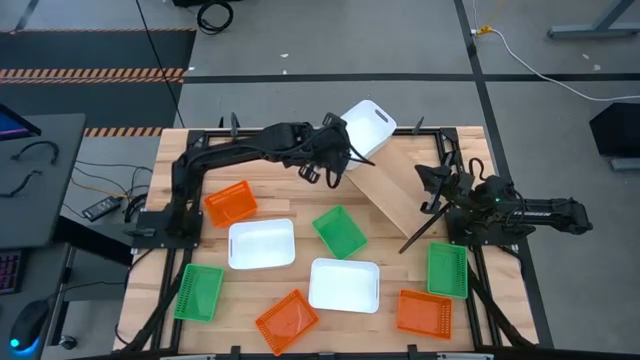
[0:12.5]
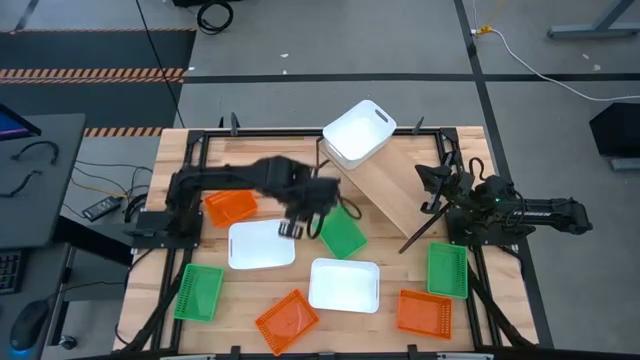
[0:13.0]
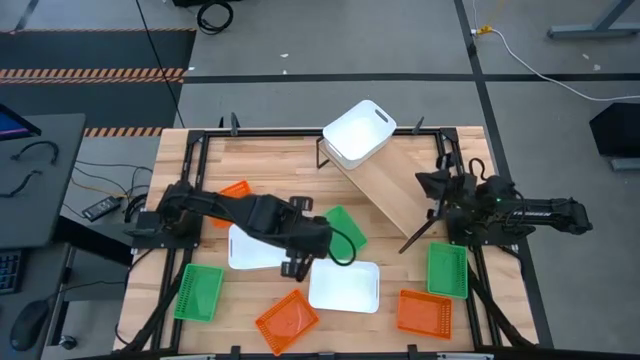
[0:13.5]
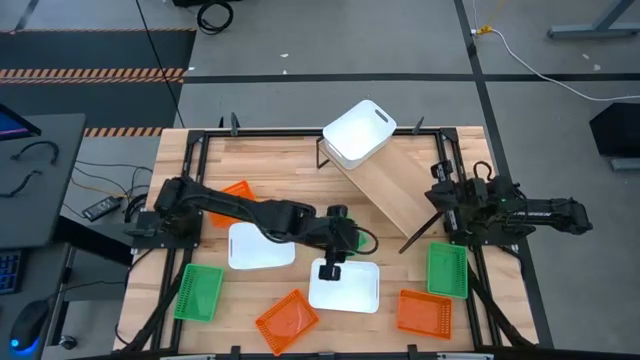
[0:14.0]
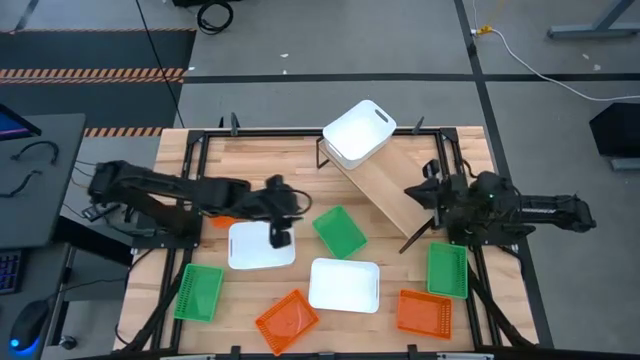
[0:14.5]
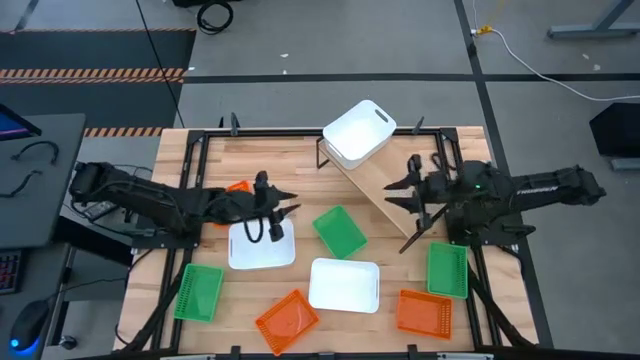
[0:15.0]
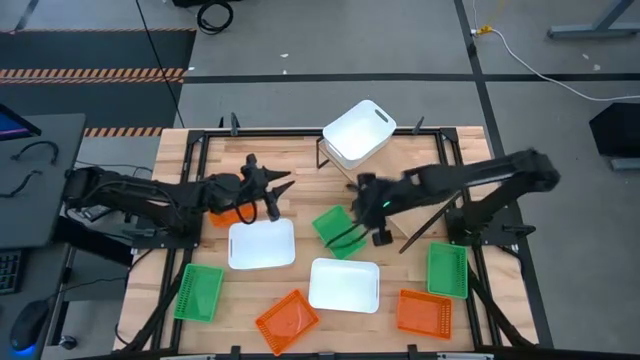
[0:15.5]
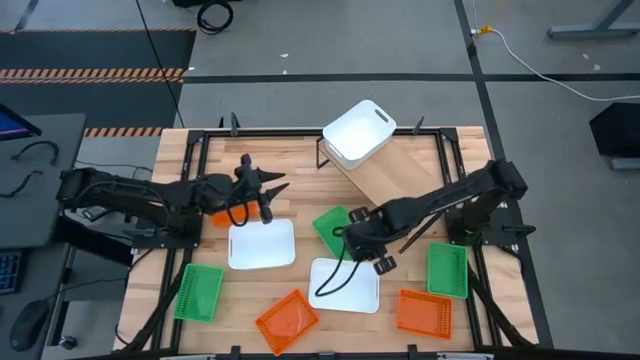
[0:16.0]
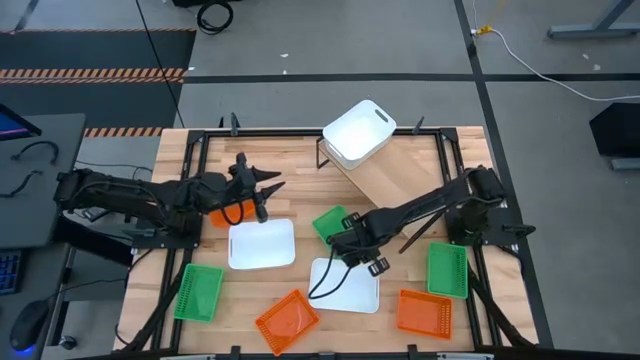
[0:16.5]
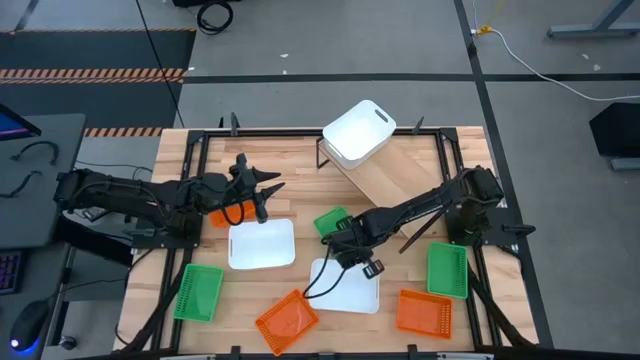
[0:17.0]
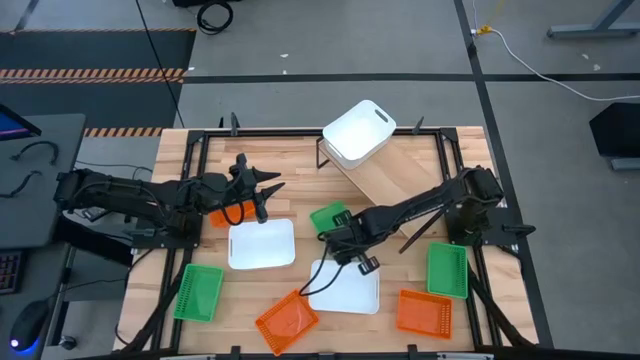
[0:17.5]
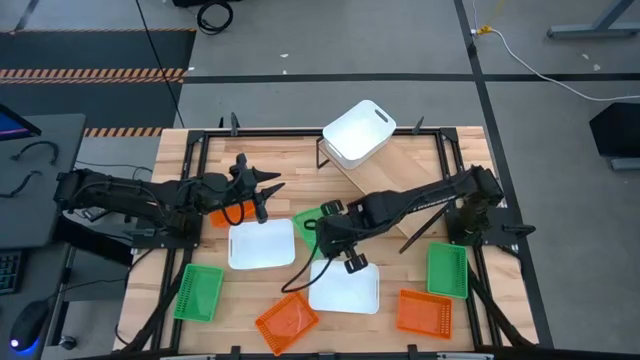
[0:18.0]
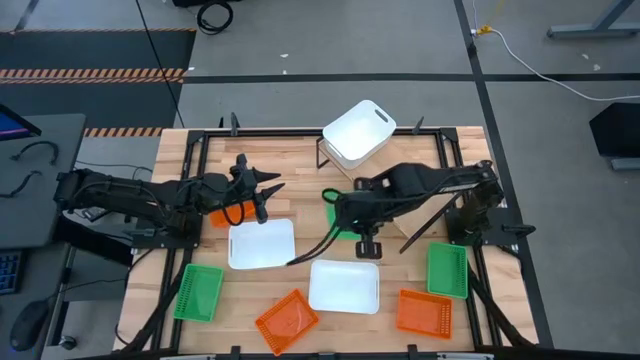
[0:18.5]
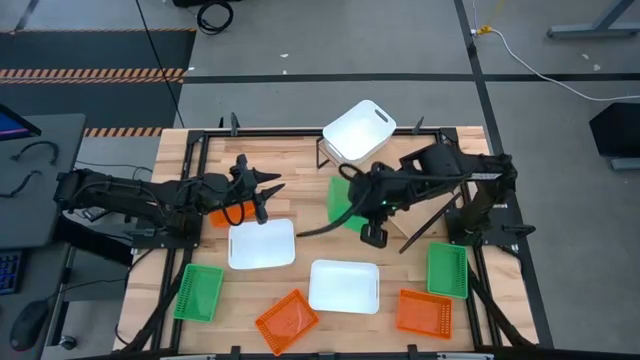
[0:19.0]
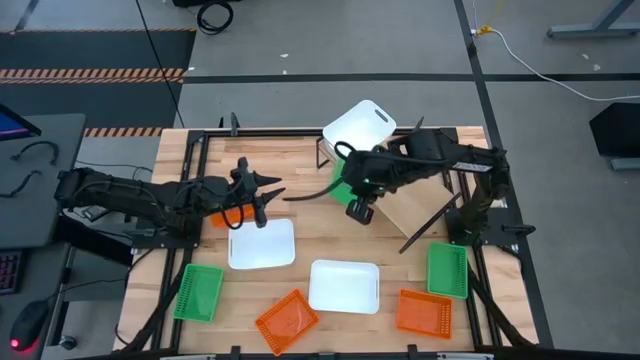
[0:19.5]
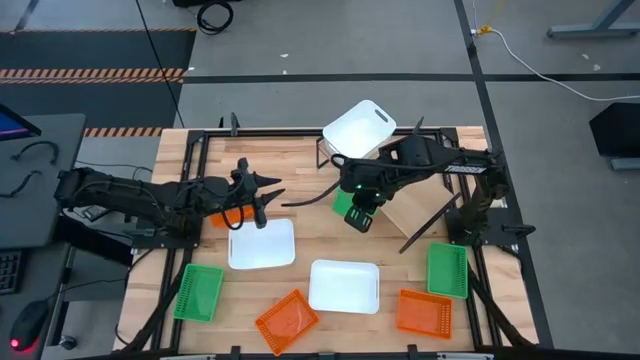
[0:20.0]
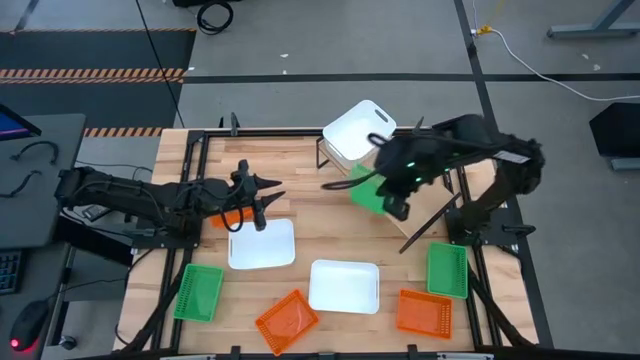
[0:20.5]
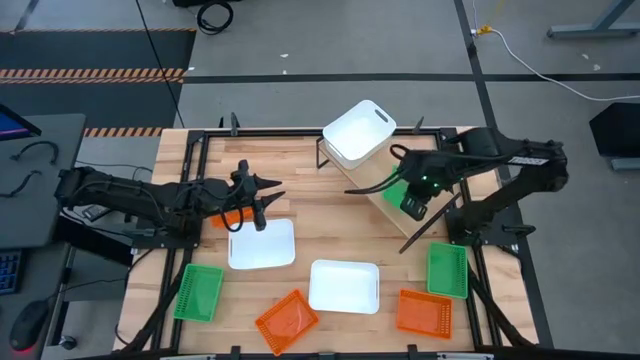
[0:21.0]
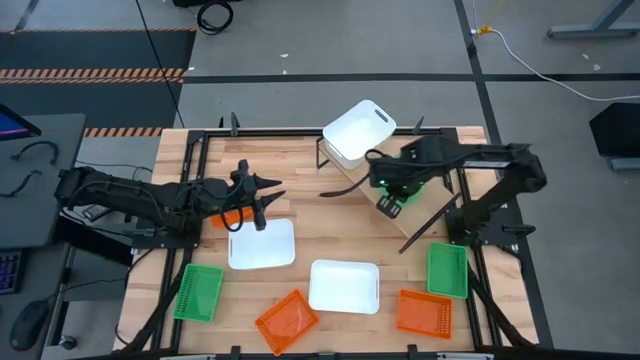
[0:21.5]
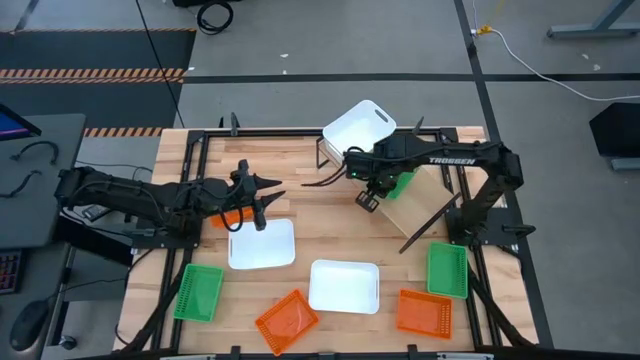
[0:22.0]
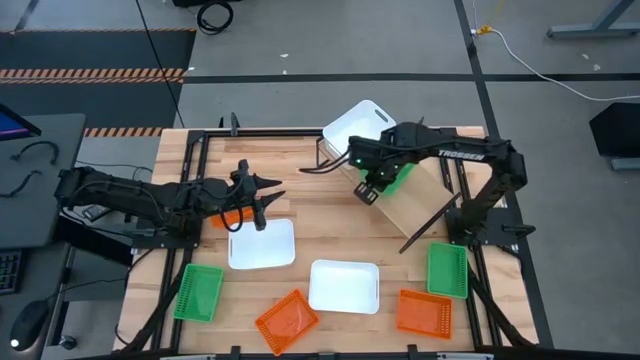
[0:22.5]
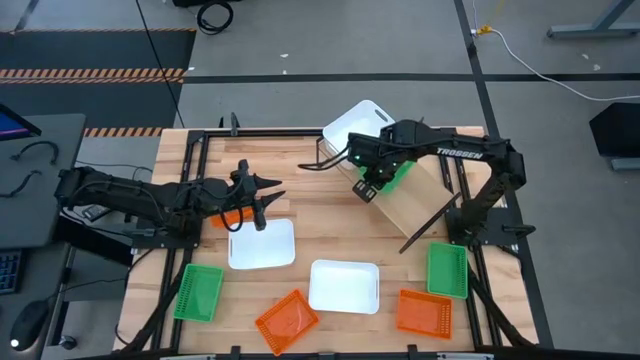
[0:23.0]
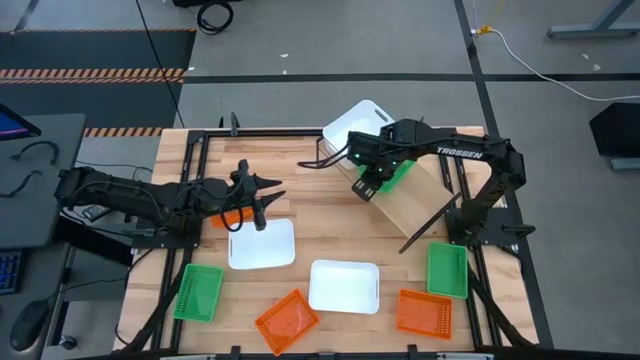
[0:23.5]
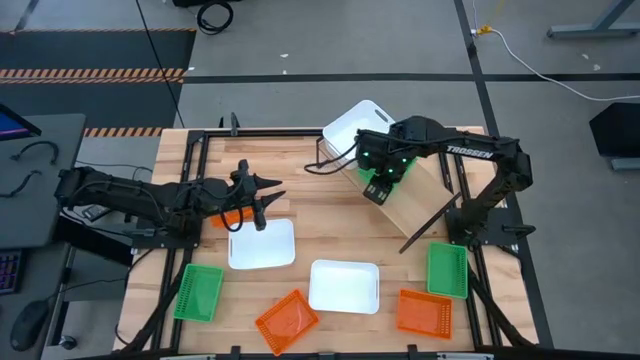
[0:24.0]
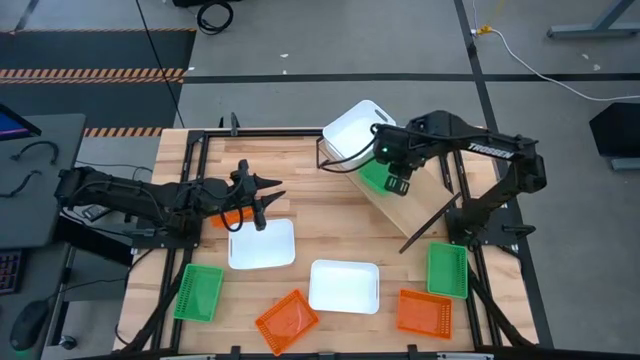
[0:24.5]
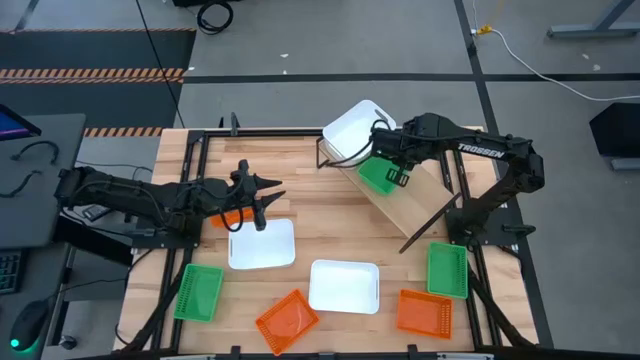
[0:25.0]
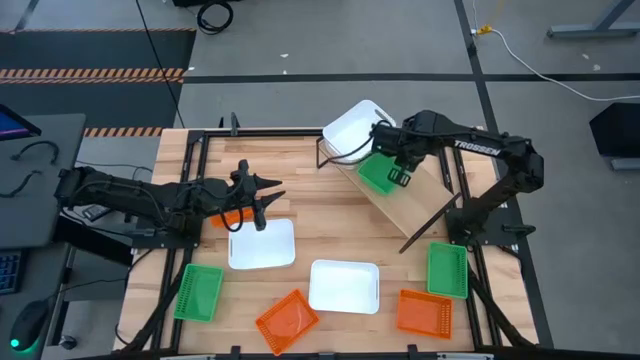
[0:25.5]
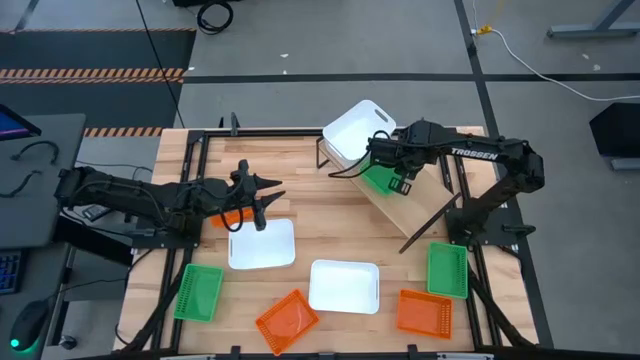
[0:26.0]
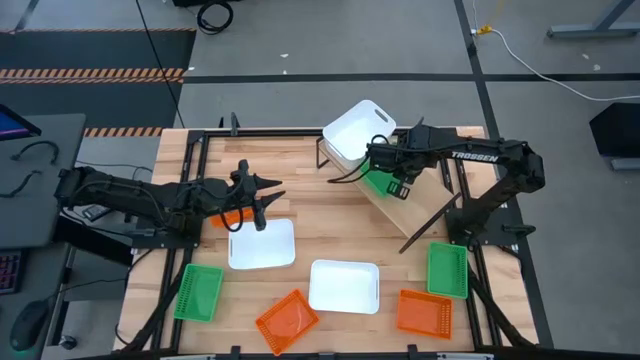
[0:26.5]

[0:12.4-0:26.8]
Task: Stack baskets on shelf by color
Put the top green bin on the shelf

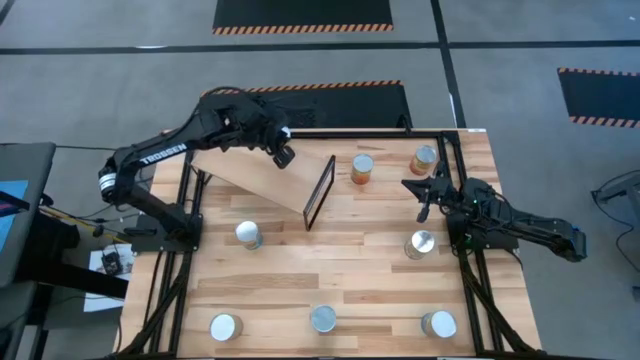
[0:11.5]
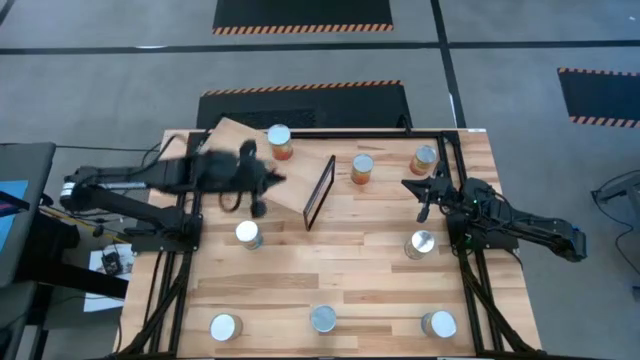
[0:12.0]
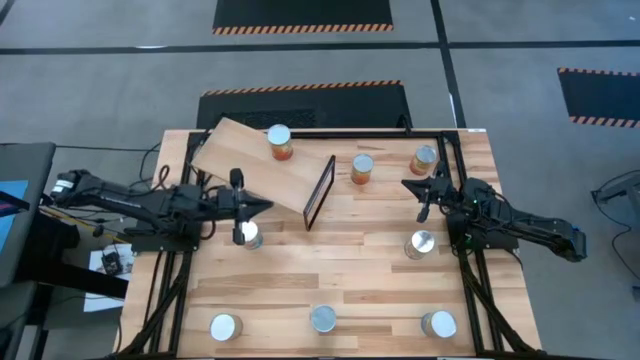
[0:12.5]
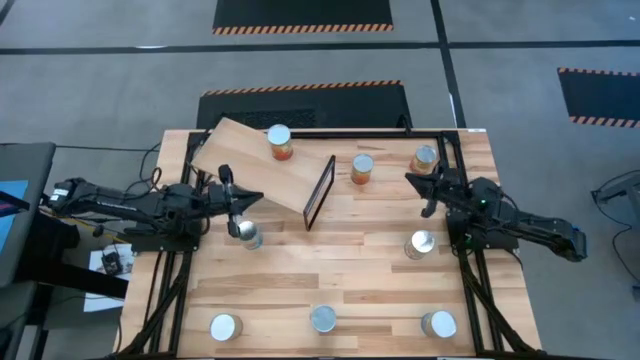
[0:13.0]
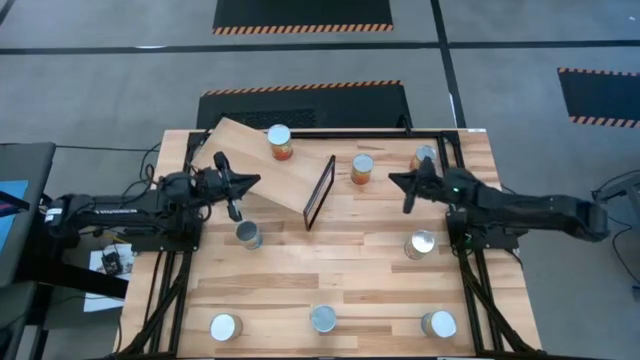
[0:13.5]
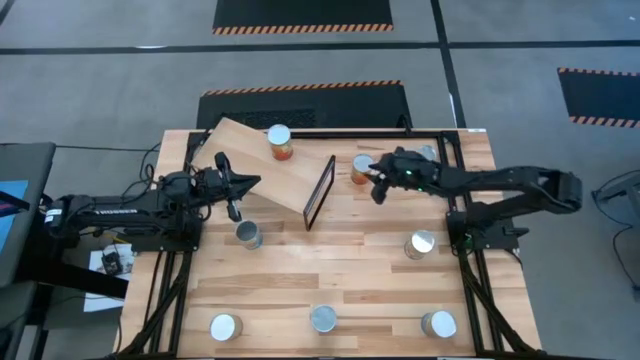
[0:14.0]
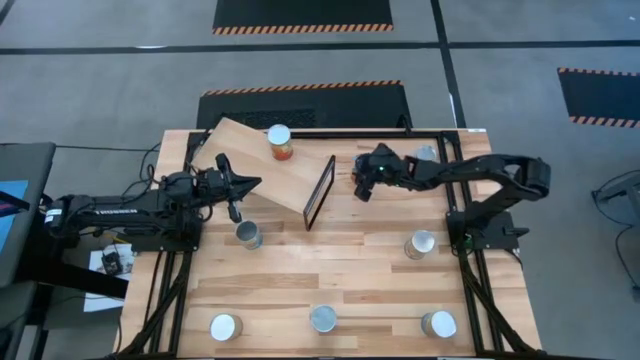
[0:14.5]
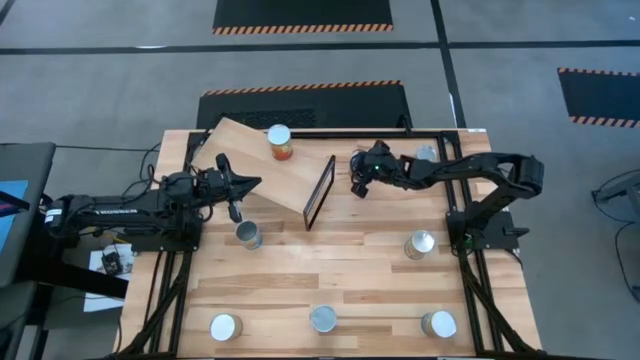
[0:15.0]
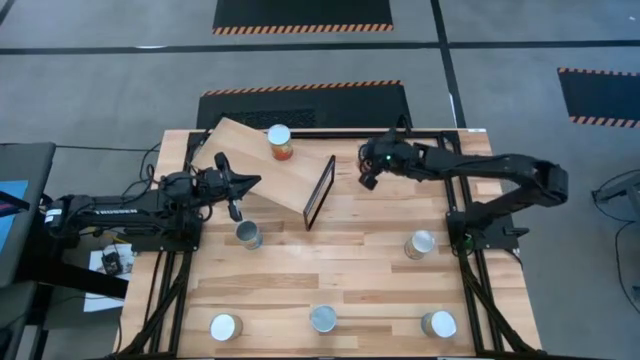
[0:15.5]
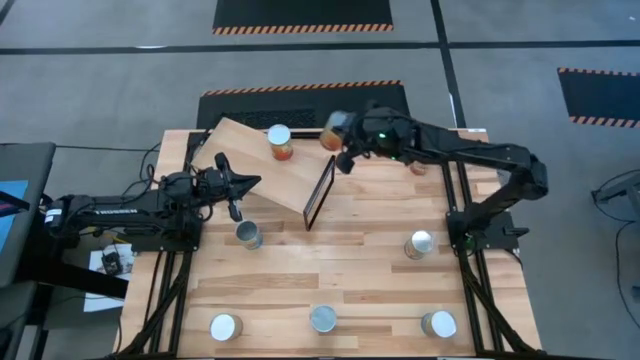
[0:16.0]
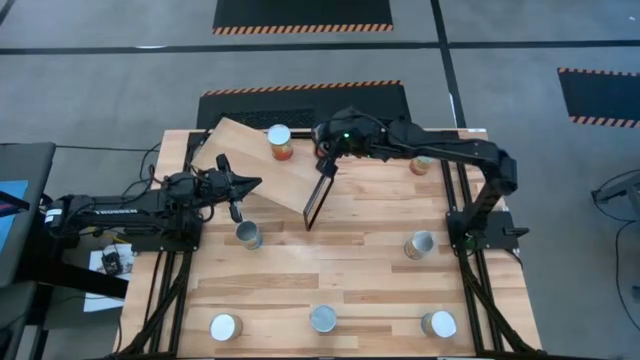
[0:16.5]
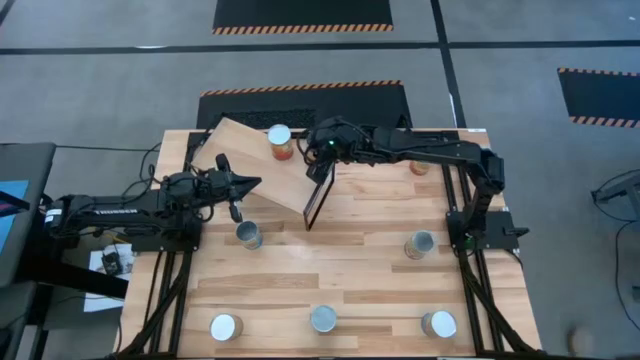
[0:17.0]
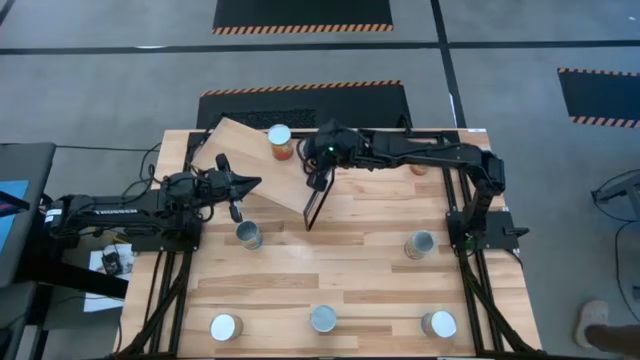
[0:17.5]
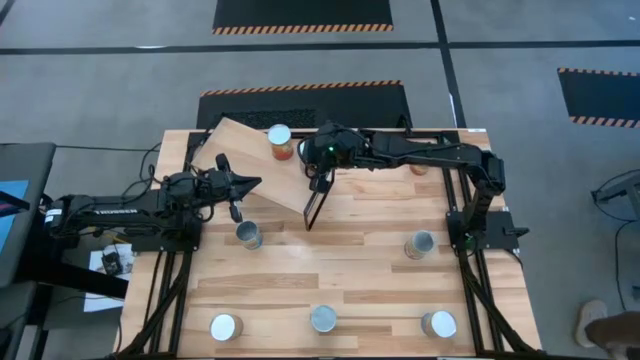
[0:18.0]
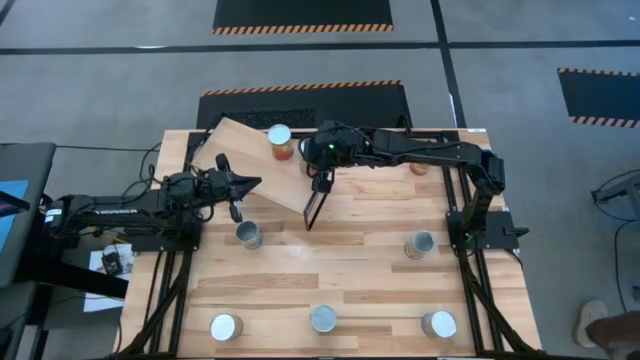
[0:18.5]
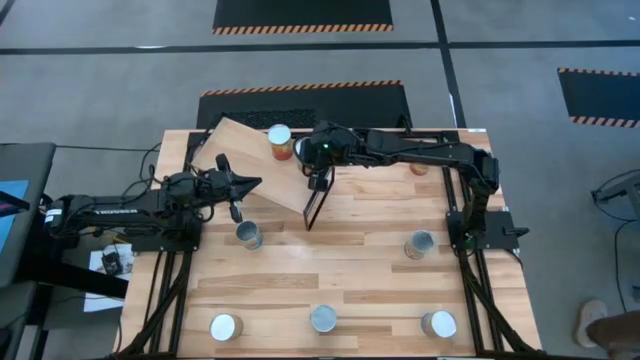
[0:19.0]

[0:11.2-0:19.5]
Task: Pick and place cans onto a shelf
Put the top canned green beans on the shelf
